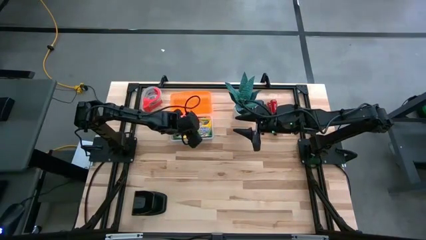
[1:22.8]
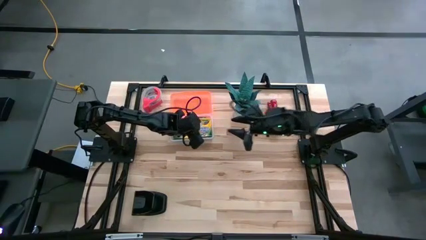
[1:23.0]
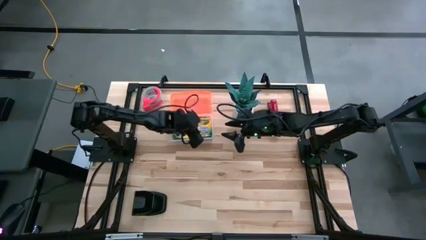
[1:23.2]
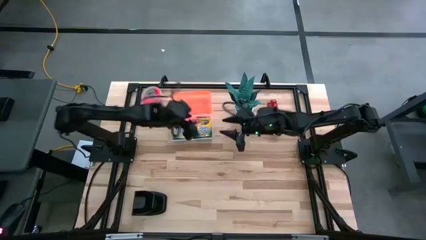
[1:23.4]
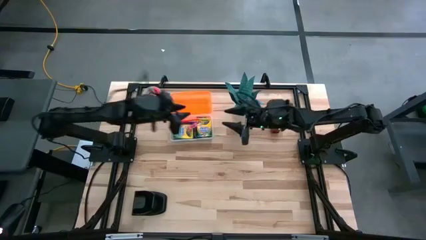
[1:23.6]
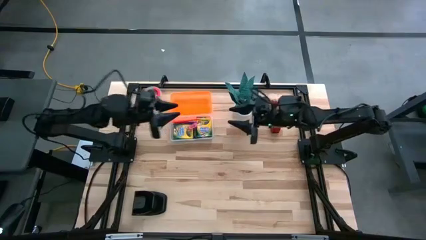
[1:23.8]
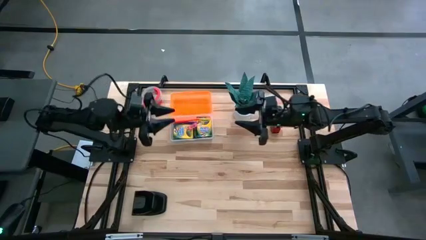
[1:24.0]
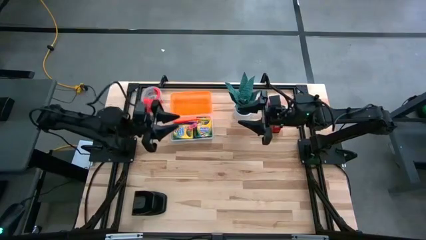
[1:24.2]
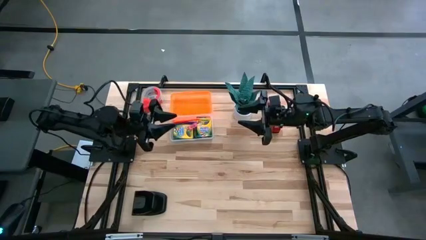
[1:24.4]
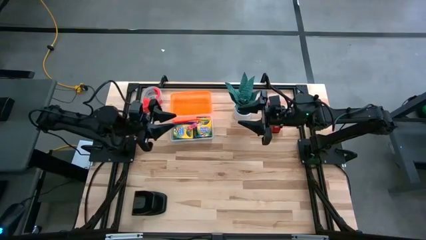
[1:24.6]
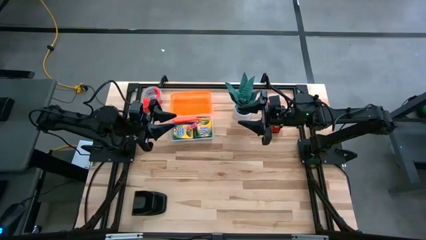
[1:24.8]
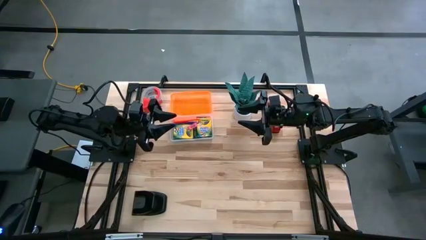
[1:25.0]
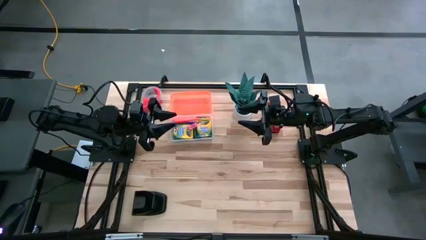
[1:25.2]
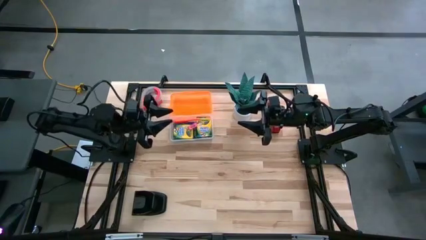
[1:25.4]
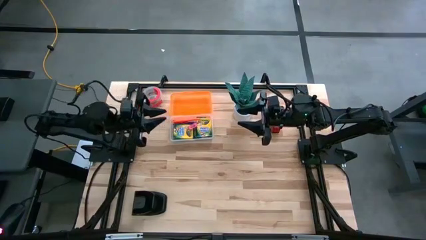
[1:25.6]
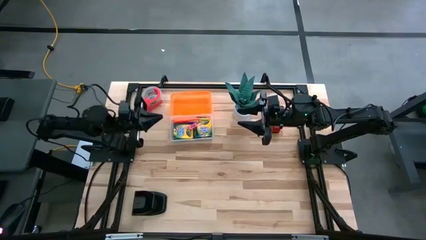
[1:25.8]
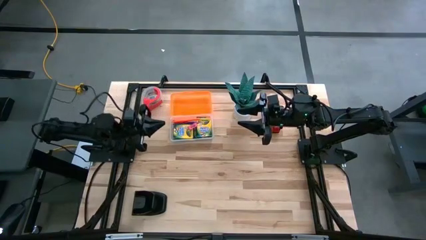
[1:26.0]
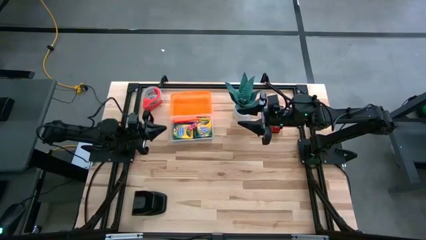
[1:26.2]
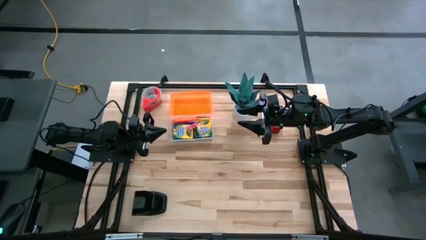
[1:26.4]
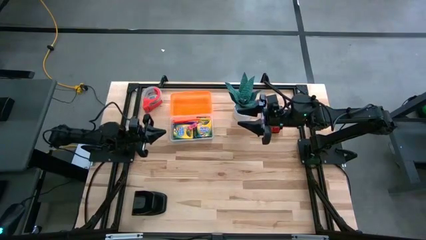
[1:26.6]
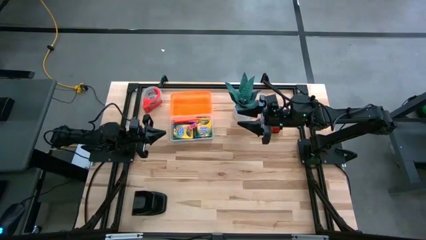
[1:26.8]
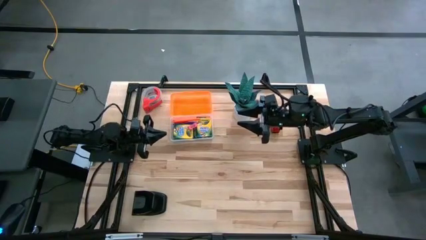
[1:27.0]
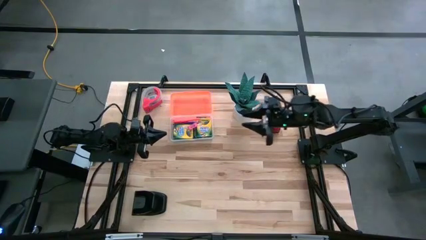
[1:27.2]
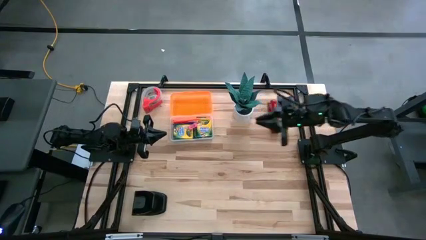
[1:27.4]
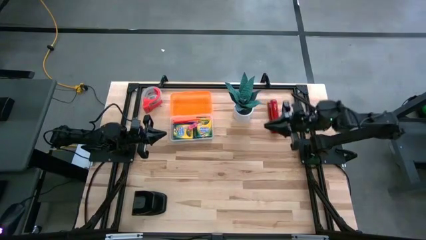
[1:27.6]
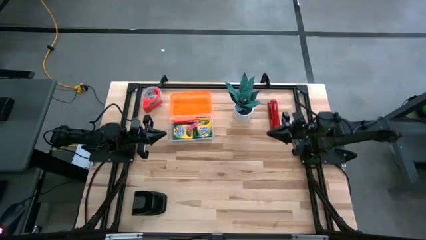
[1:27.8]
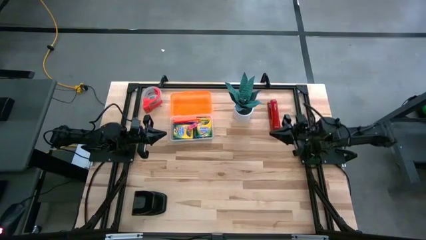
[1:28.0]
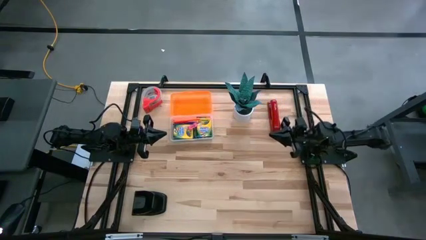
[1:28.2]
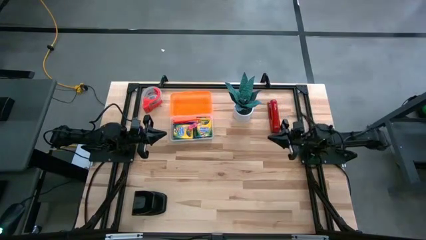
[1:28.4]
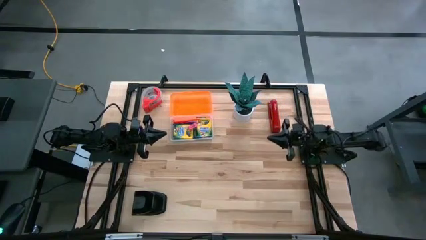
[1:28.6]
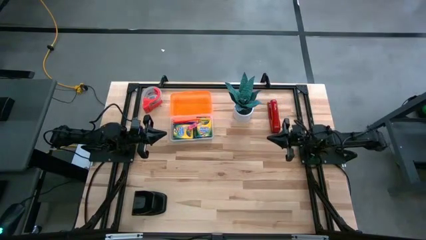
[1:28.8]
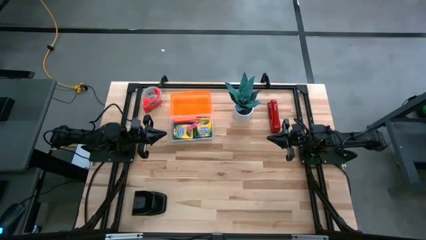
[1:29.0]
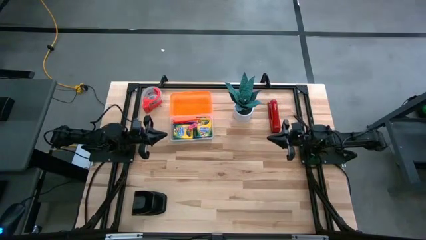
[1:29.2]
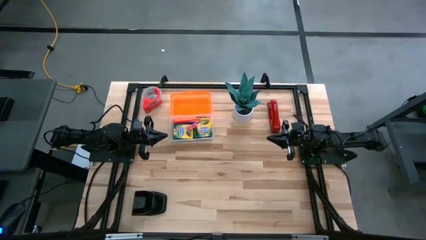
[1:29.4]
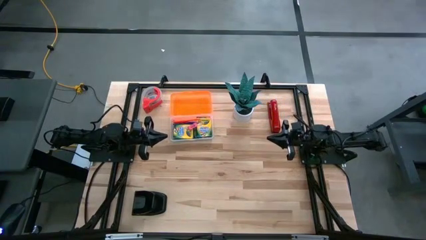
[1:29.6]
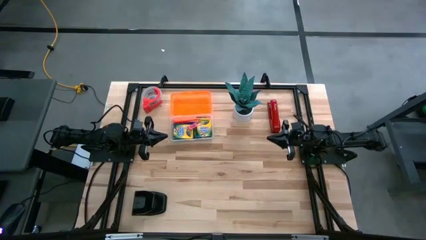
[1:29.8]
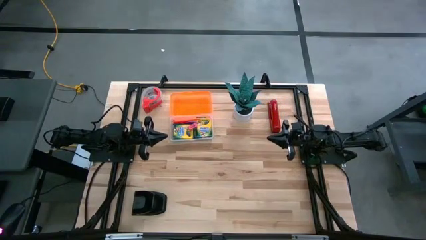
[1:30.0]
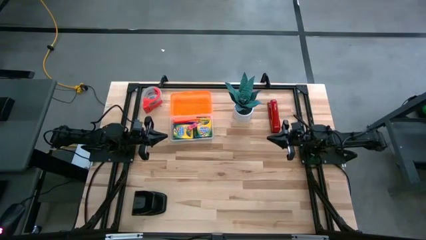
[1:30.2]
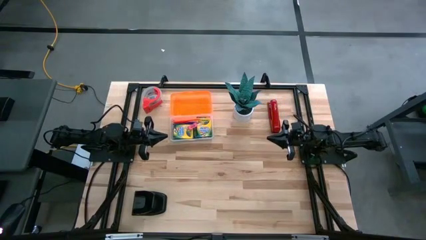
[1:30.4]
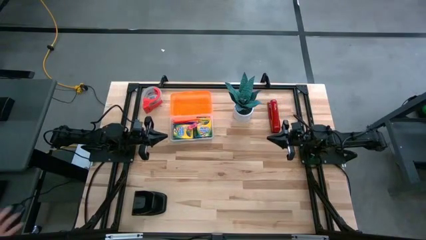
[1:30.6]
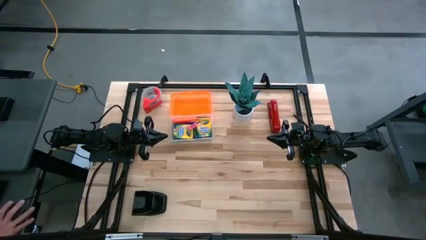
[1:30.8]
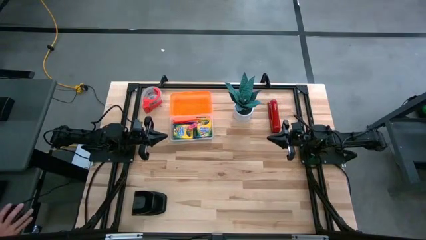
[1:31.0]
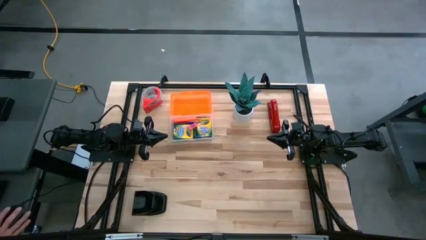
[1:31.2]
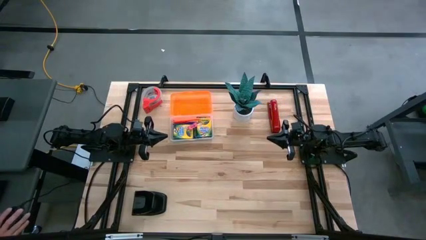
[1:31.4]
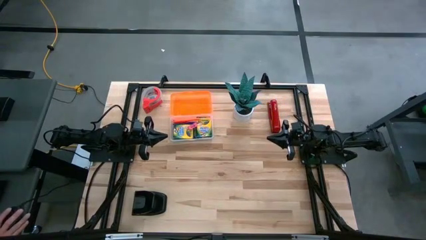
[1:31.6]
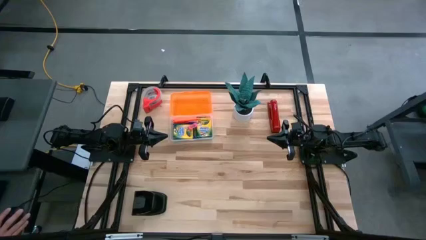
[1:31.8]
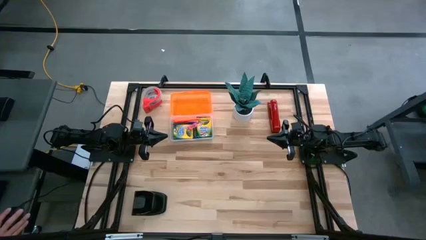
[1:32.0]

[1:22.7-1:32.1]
Task: Pack school essentials
Return to Home Position

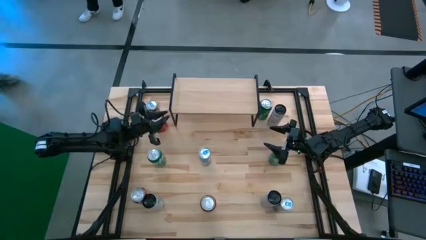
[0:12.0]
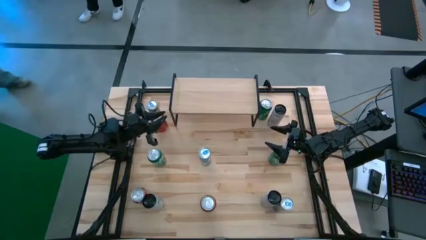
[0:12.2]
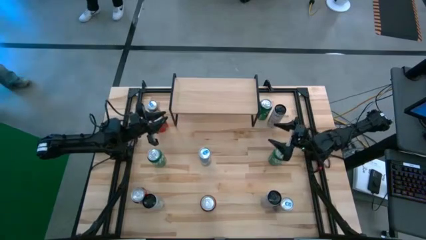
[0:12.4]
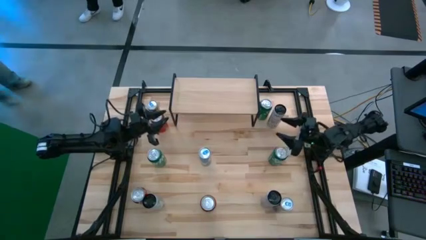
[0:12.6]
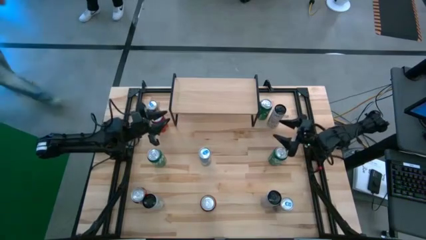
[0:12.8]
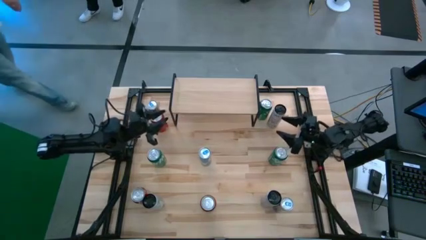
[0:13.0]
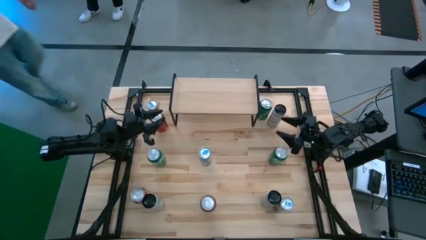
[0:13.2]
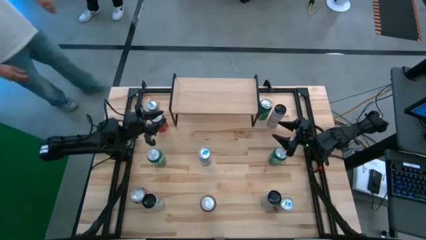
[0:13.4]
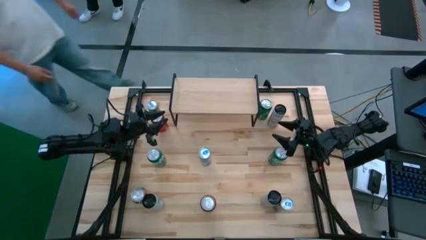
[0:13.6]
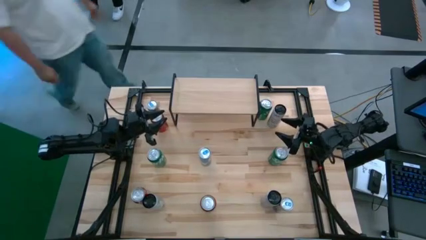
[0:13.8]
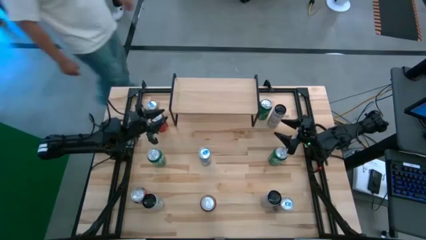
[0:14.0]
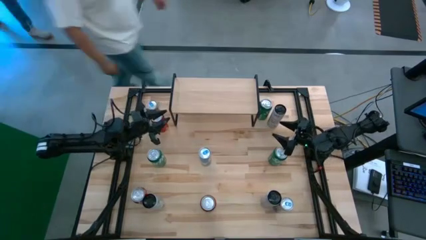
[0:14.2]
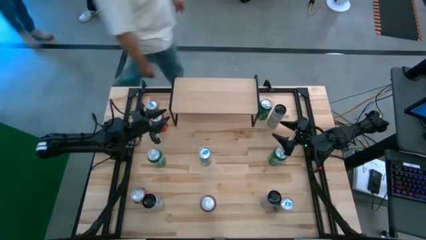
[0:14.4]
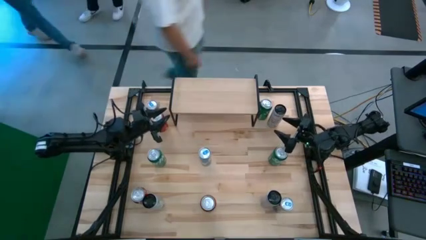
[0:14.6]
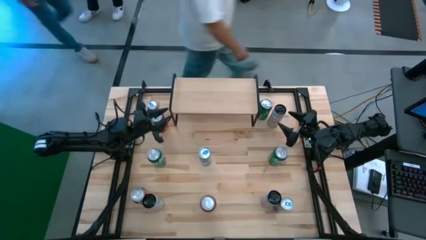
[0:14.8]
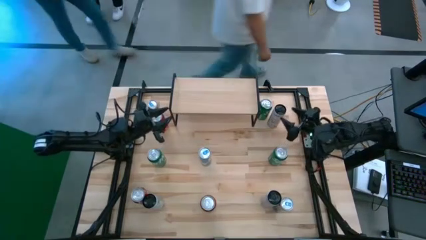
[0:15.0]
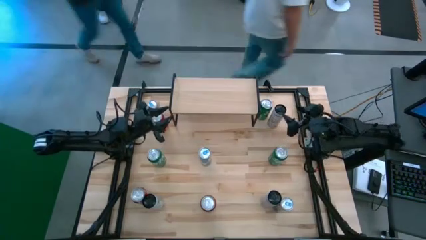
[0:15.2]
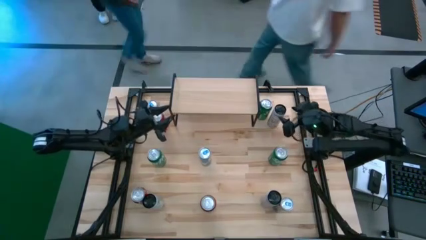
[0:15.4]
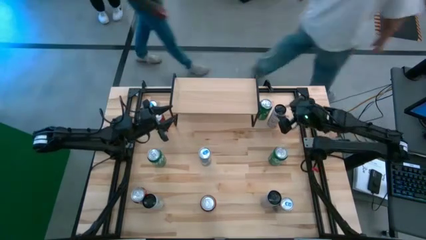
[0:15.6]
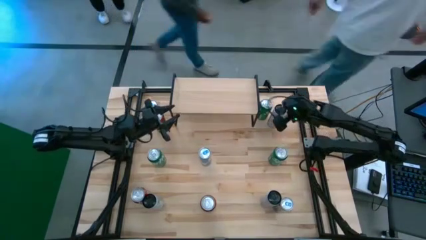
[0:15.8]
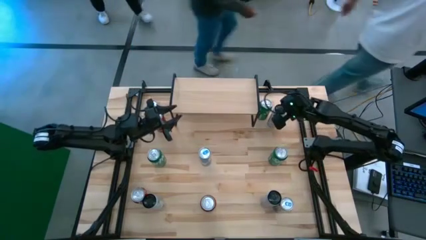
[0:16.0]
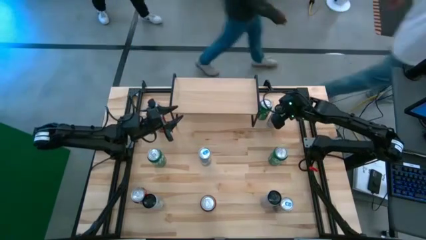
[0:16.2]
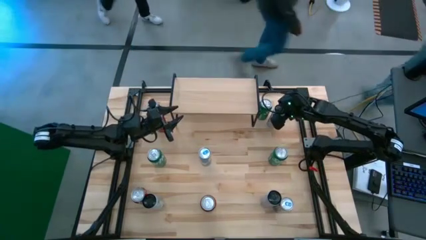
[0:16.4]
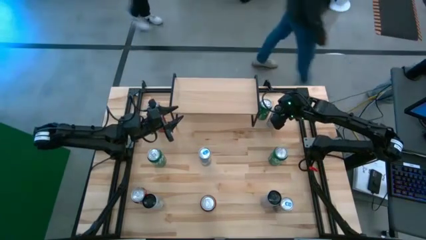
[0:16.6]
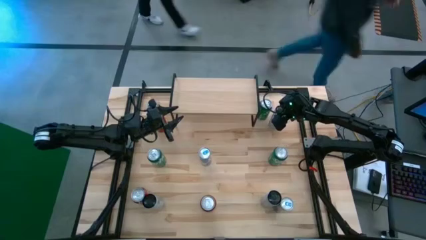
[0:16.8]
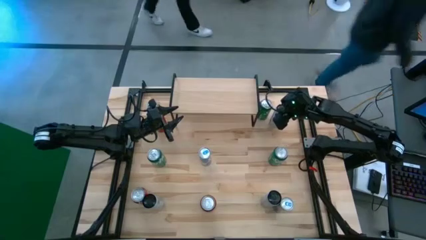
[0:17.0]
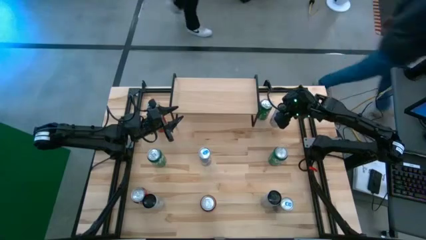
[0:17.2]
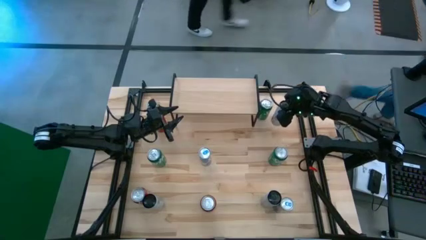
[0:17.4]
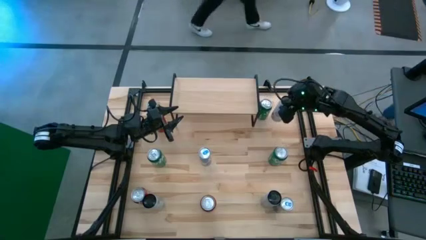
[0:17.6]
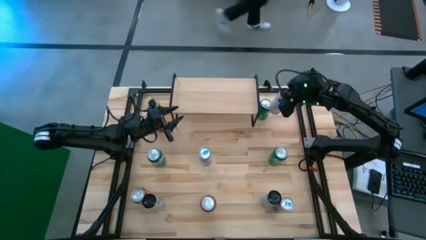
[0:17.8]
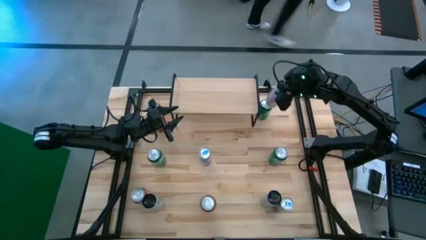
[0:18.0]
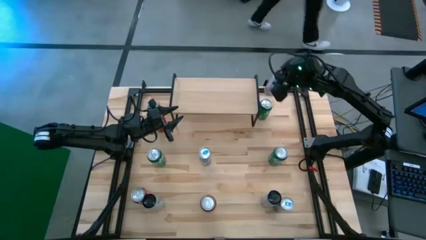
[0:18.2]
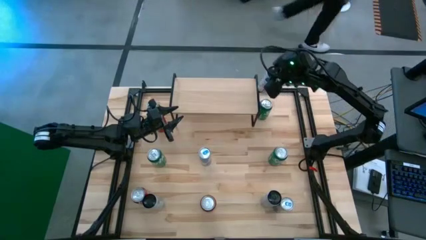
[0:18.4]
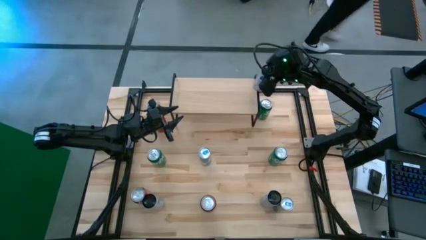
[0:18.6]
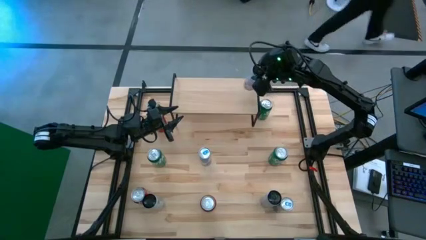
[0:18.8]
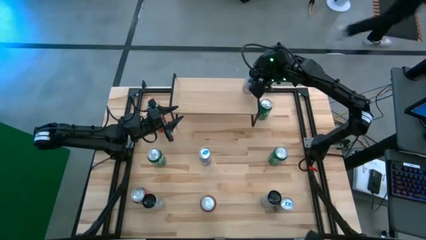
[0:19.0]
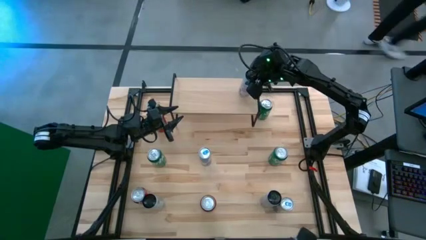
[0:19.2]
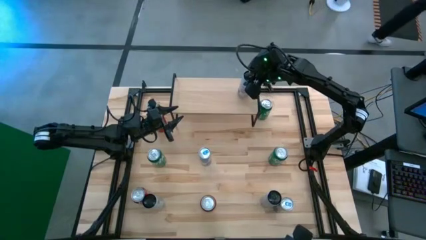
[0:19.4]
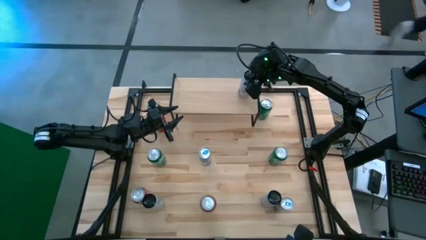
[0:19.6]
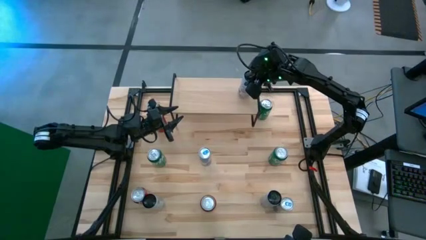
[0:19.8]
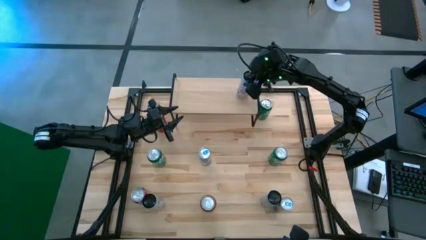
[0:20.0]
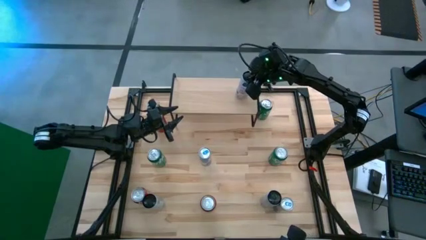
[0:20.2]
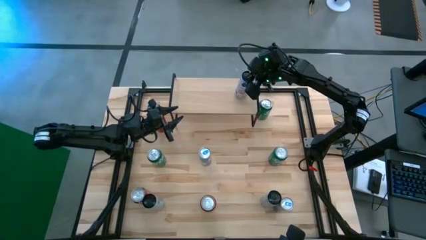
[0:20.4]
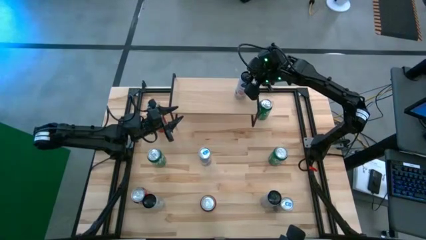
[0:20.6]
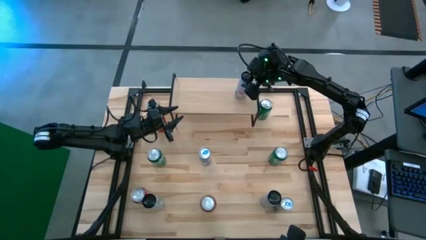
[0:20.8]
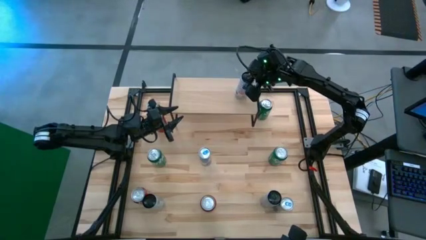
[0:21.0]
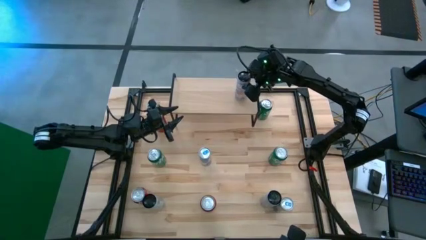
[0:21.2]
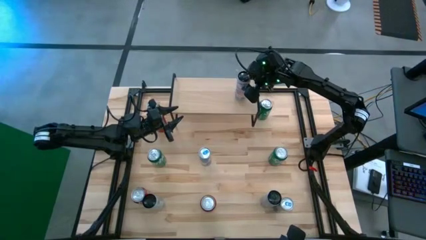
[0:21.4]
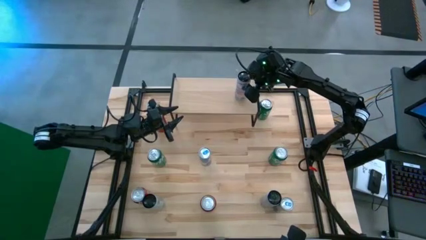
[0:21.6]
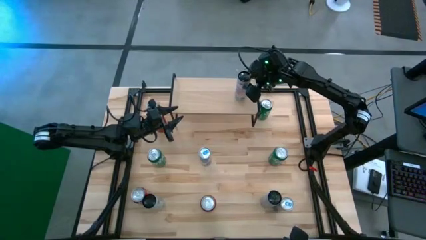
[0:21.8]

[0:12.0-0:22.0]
Task: Place canned beverage on shelf
Put the top right white pink soda can on the shelf
